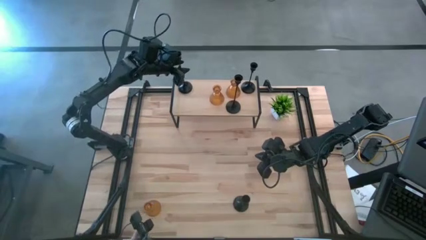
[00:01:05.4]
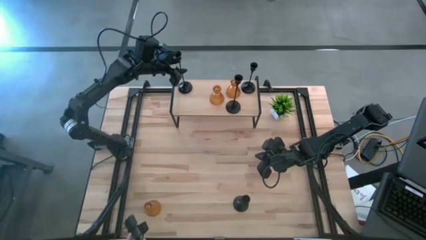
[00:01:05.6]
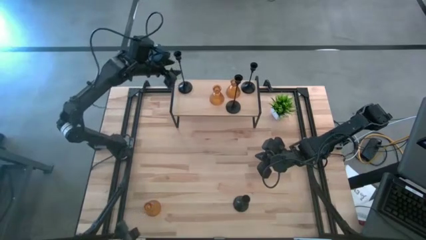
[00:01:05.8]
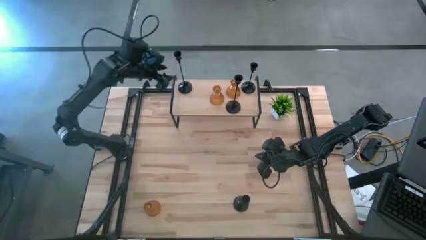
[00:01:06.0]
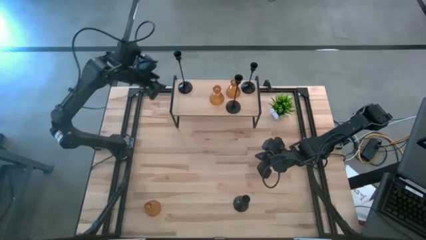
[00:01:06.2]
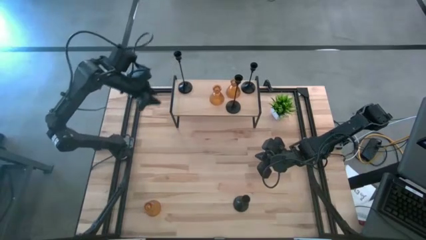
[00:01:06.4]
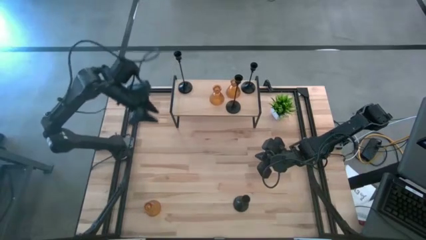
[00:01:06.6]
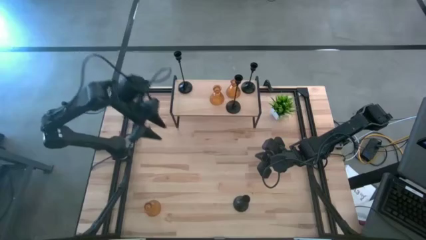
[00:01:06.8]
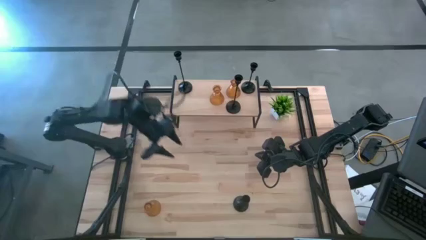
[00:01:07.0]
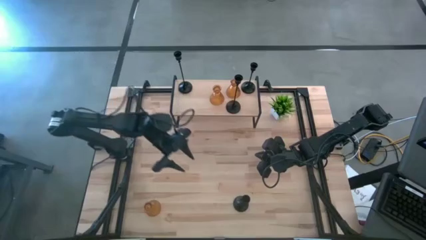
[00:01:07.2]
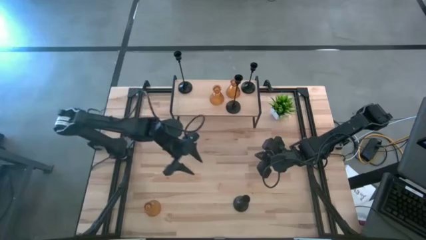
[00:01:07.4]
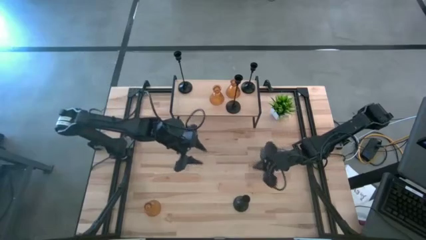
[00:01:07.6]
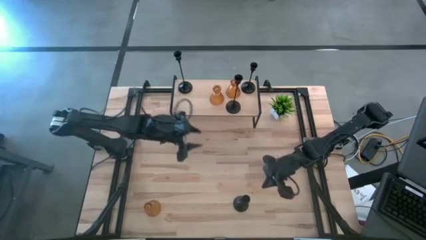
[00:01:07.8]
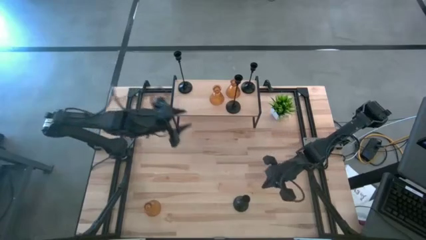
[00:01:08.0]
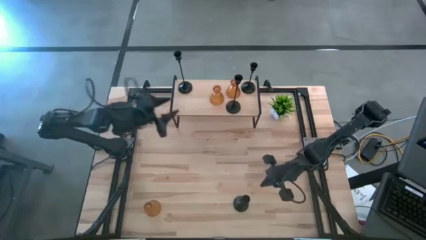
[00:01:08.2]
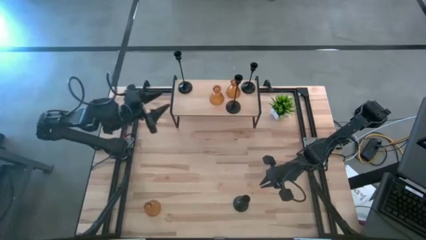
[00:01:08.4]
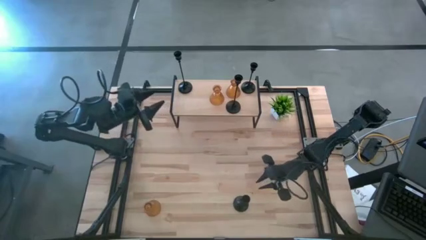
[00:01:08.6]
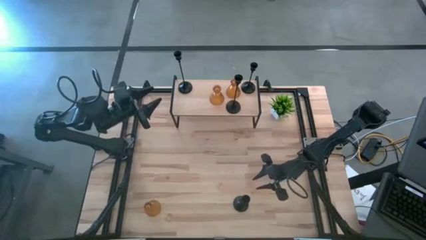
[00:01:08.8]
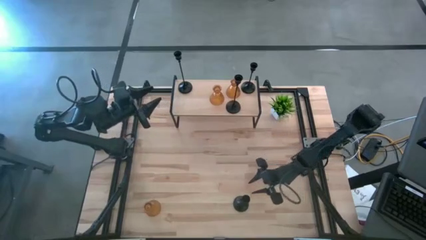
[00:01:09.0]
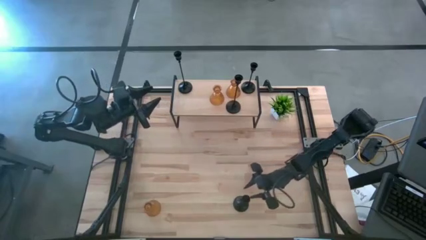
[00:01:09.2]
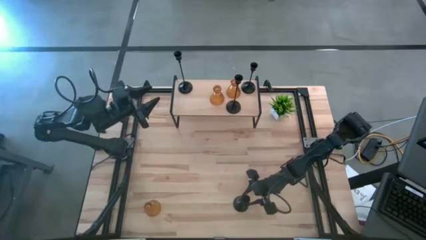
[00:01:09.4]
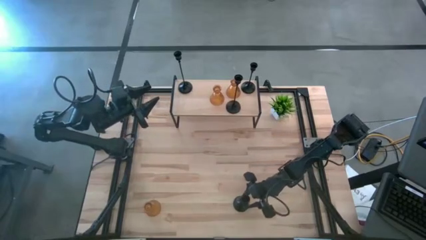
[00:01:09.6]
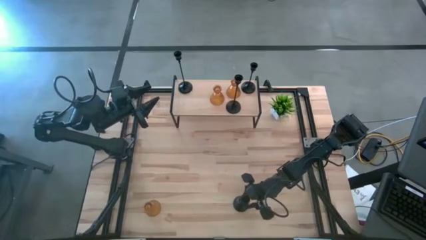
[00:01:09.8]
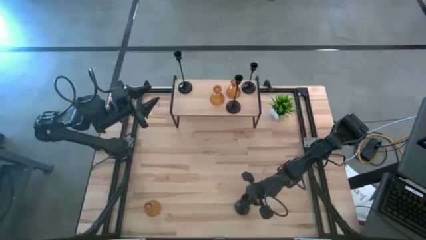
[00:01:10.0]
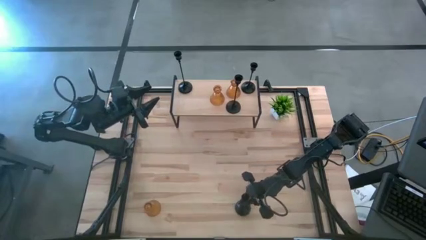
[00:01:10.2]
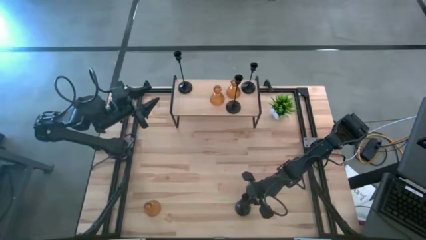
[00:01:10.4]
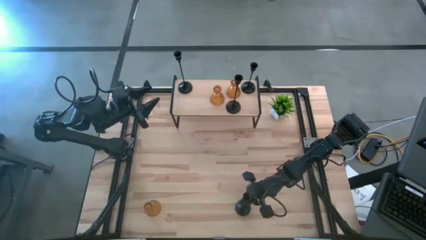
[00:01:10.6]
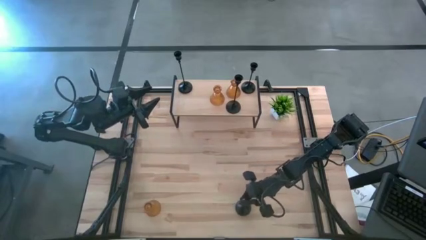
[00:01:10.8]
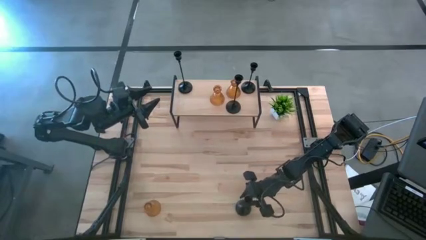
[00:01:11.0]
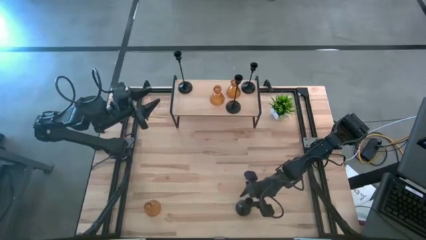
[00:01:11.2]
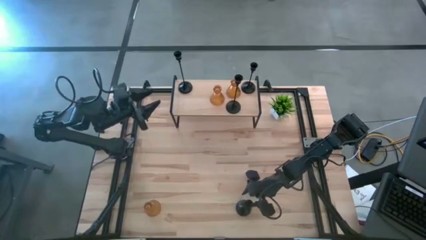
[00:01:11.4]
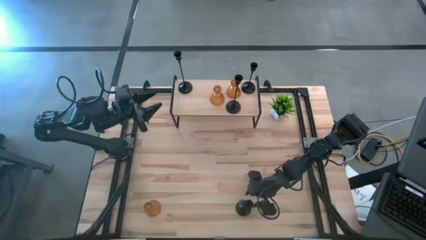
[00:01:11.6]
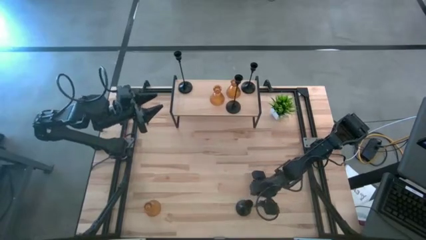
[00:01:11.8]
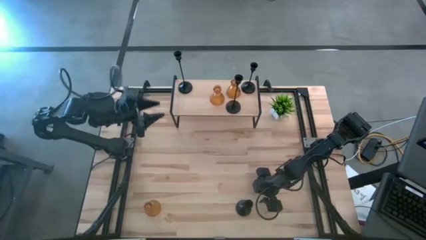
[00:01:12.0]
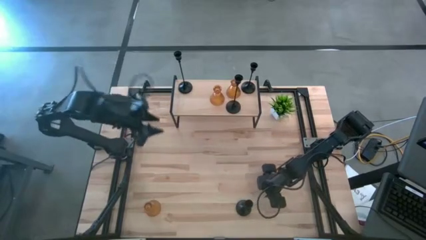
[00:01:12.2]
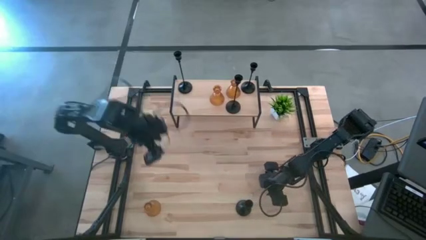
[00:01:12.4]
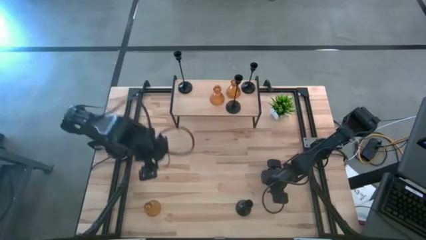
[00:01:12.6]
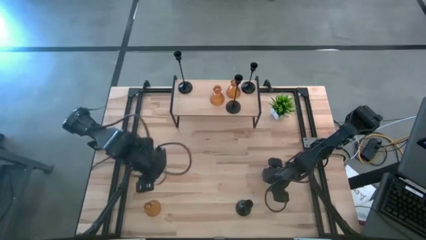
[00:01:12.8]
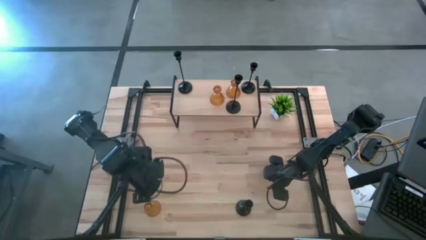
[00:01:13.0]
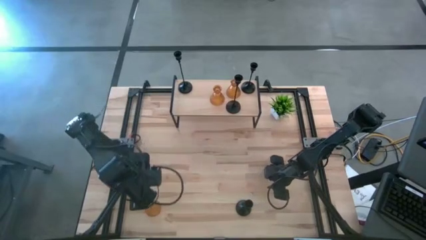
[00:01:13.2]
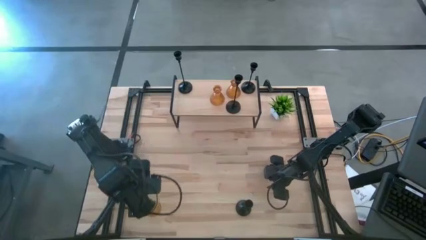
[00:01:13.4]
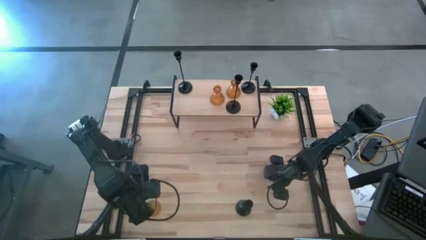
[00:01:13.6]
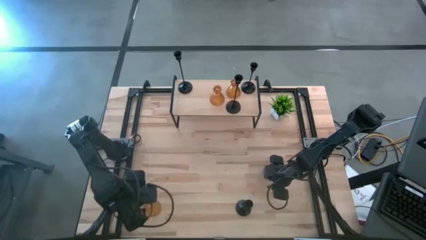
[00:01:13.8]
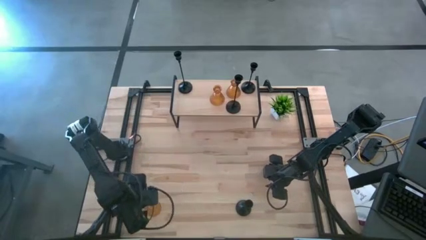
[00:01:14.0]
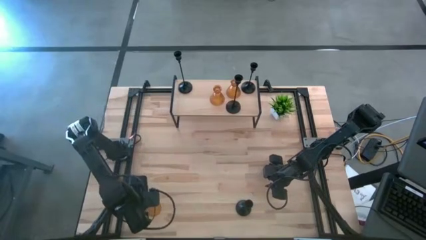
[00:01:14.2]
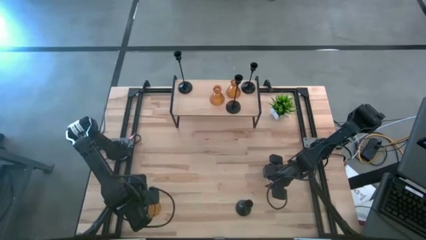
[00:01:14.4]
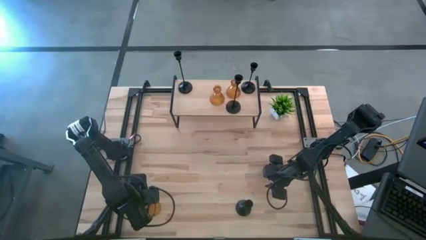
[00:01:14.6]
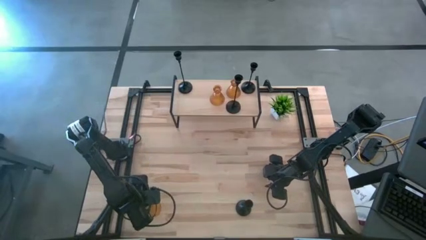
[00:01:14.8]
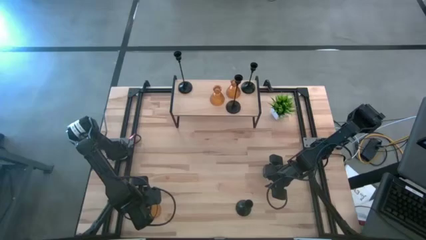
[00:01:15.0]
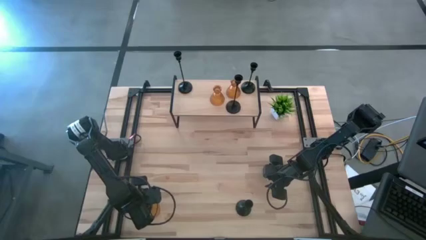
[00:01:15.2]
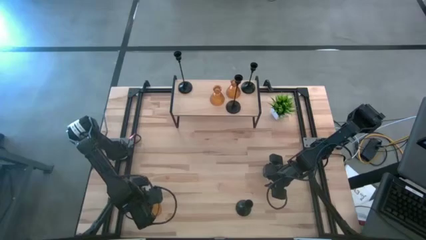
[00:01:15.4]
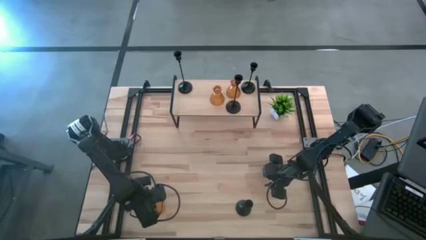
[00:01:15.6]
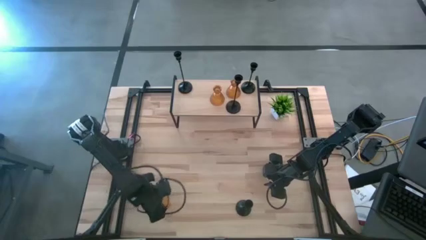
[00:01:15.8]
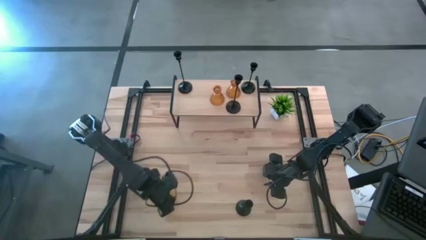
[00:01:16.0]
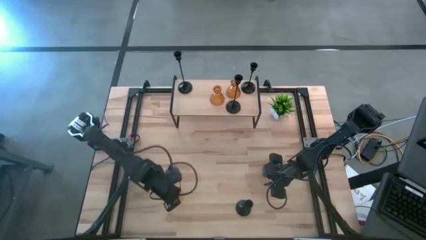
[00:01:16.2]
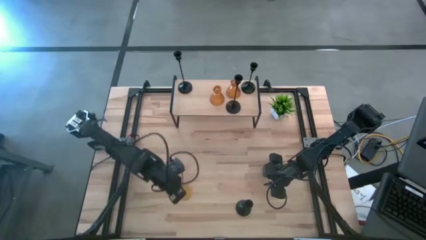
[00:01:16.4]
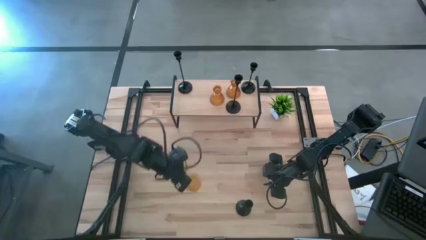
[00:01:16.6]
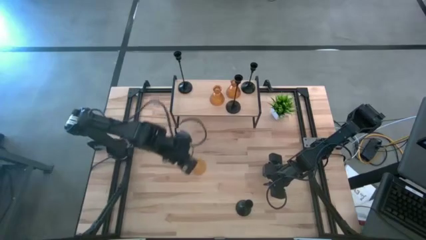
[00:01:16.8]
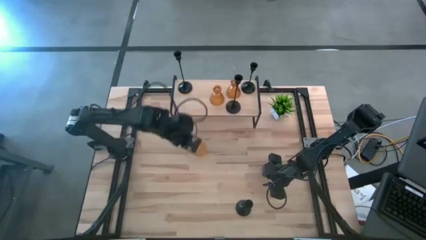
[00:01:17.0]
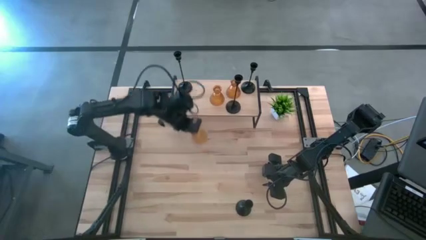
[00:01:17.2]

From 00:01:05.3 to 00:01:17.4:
Task: Pick & Place candle stick holders
Put the yellow glass candle holder on the shelf
